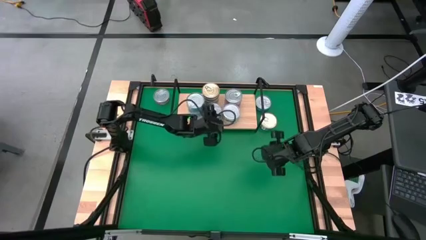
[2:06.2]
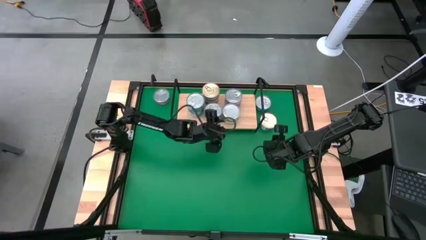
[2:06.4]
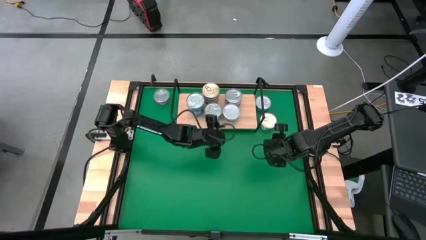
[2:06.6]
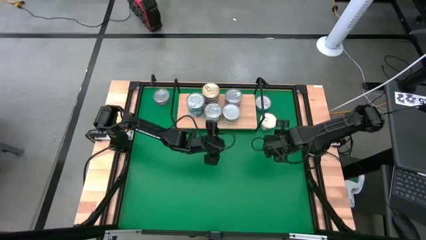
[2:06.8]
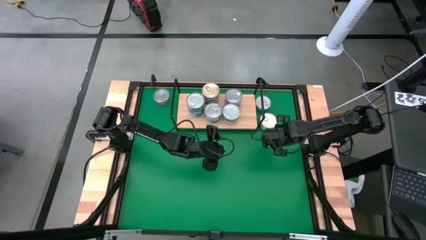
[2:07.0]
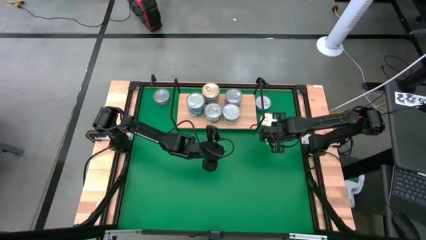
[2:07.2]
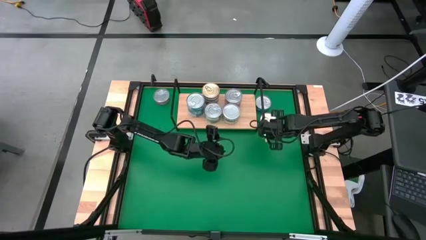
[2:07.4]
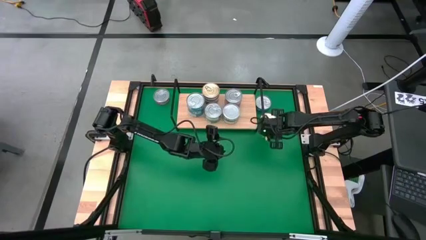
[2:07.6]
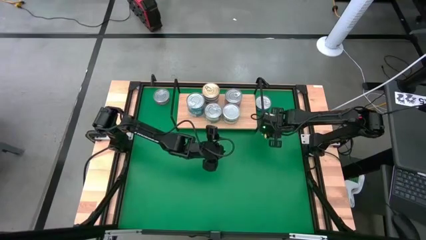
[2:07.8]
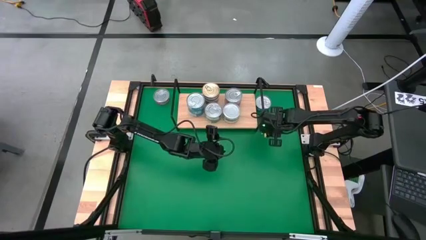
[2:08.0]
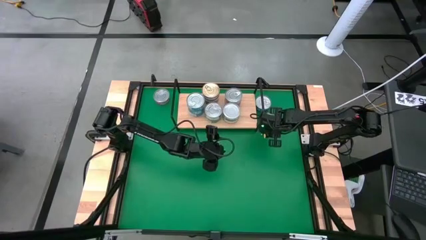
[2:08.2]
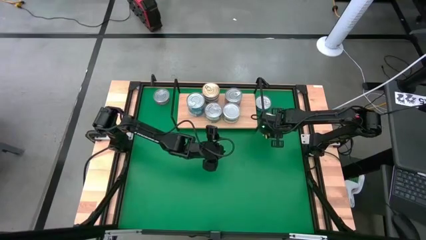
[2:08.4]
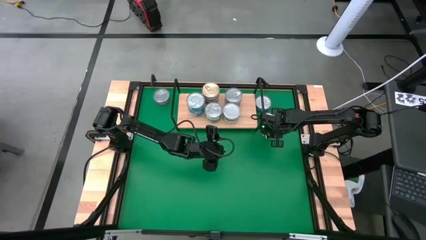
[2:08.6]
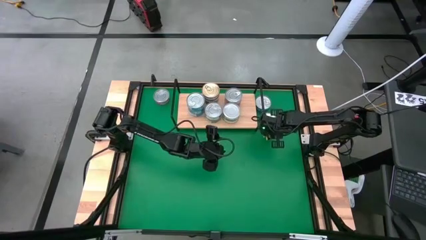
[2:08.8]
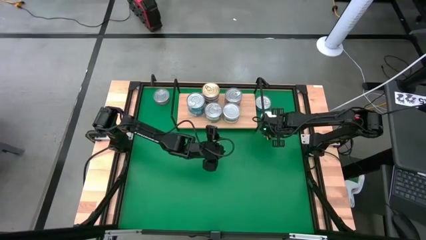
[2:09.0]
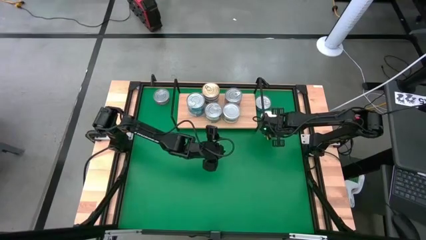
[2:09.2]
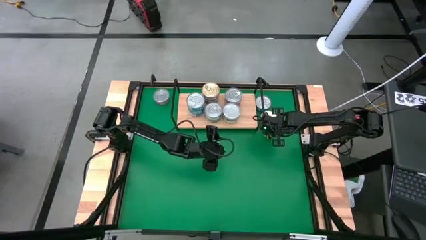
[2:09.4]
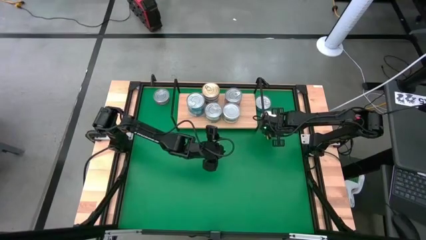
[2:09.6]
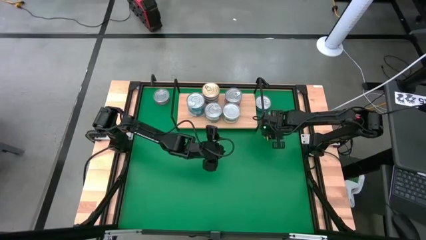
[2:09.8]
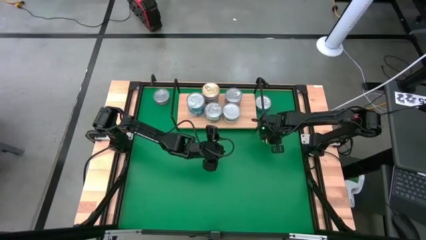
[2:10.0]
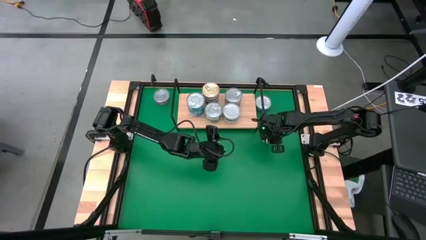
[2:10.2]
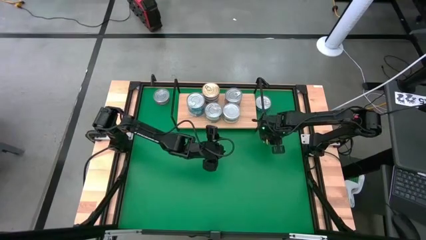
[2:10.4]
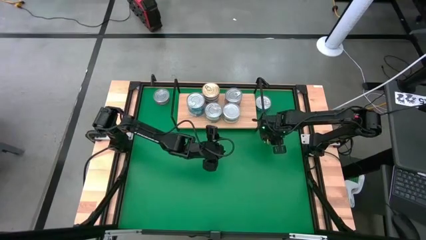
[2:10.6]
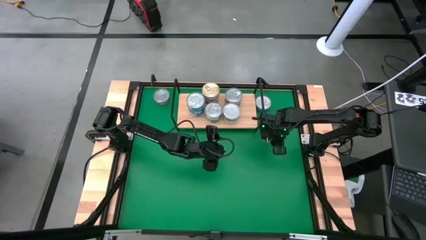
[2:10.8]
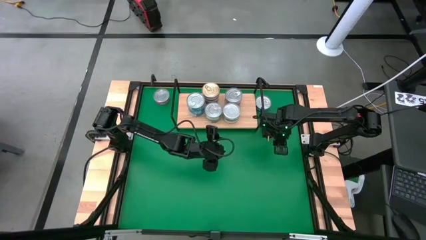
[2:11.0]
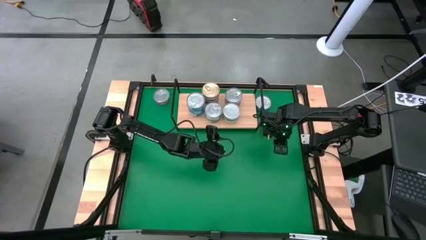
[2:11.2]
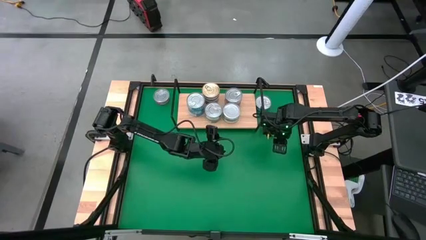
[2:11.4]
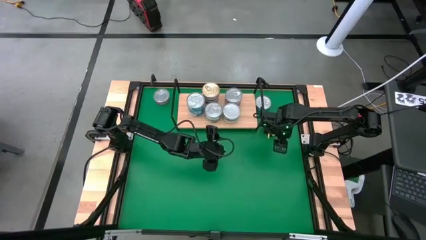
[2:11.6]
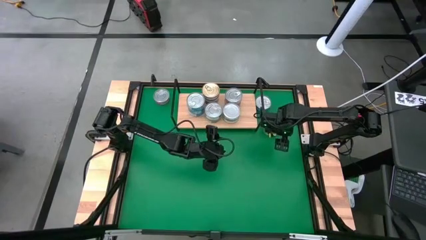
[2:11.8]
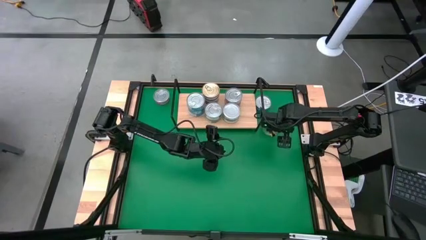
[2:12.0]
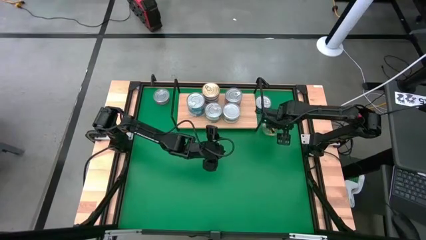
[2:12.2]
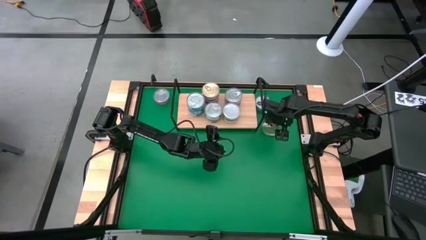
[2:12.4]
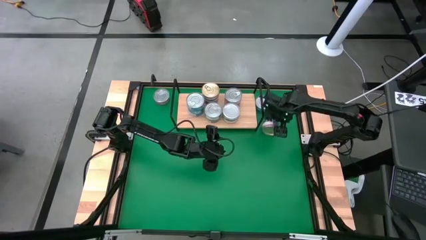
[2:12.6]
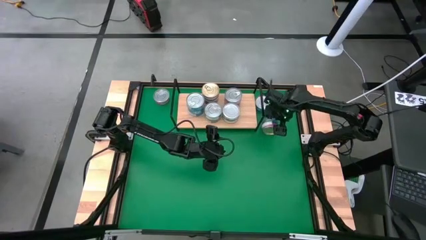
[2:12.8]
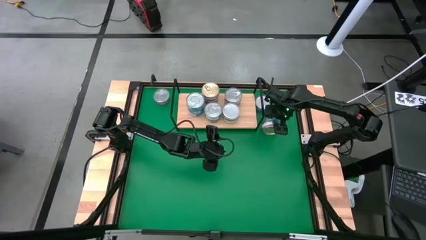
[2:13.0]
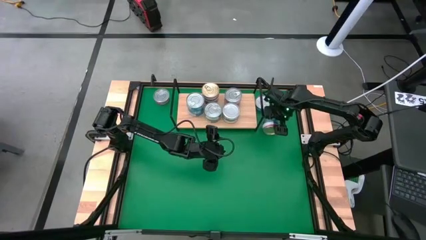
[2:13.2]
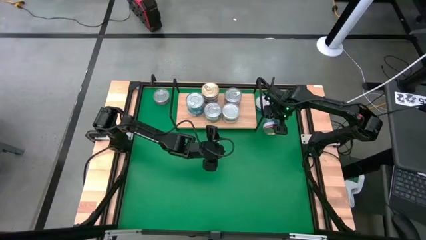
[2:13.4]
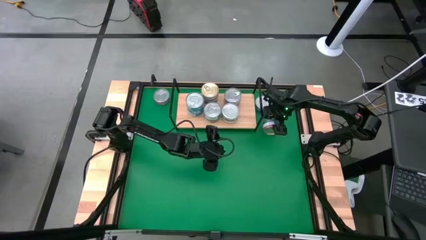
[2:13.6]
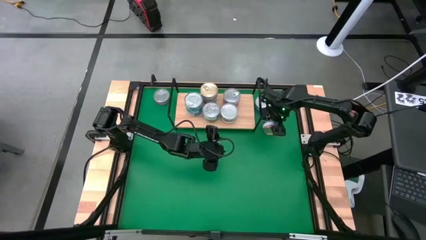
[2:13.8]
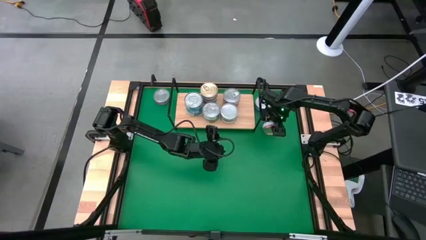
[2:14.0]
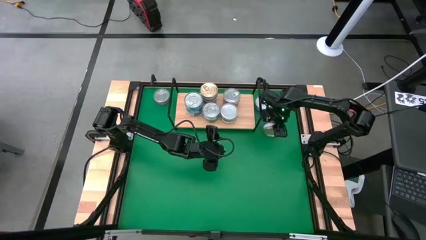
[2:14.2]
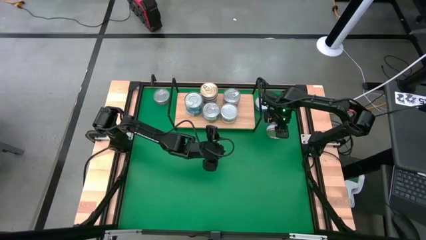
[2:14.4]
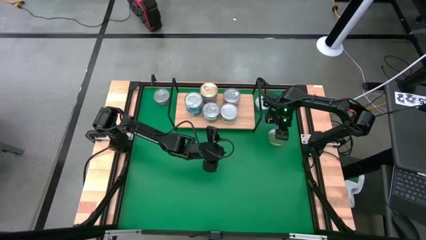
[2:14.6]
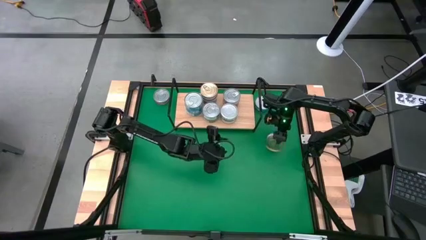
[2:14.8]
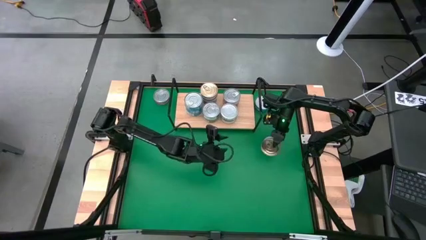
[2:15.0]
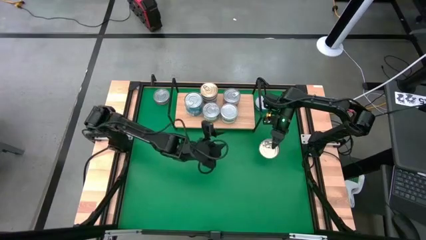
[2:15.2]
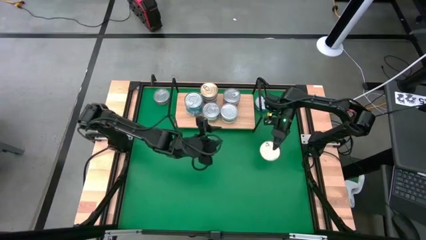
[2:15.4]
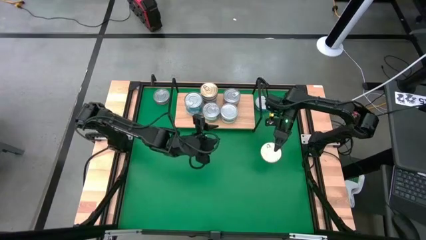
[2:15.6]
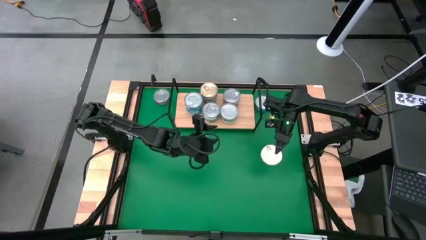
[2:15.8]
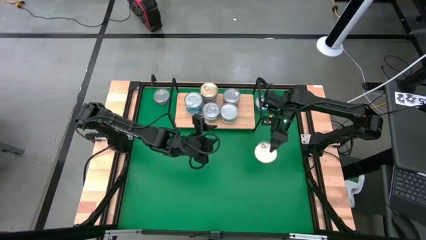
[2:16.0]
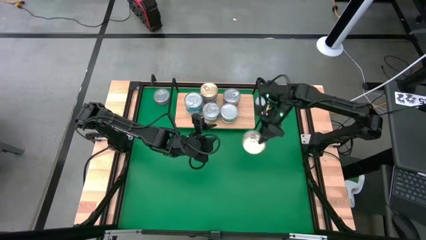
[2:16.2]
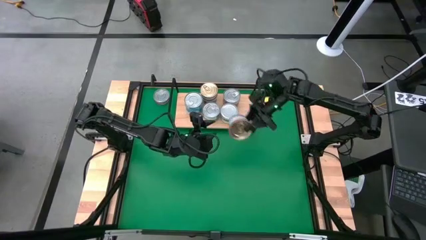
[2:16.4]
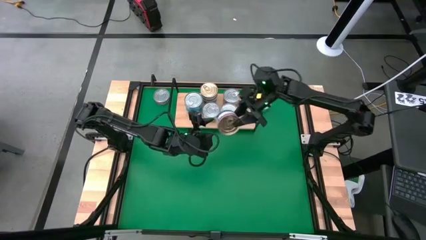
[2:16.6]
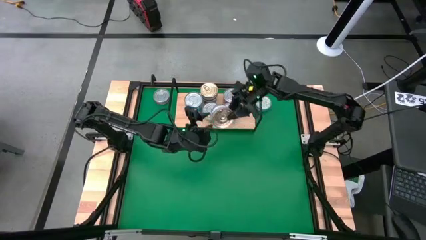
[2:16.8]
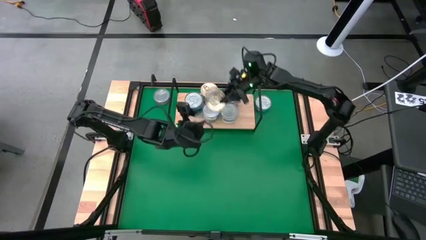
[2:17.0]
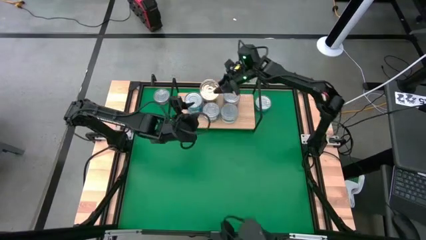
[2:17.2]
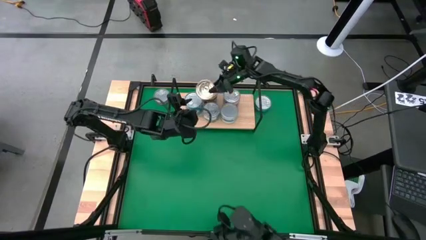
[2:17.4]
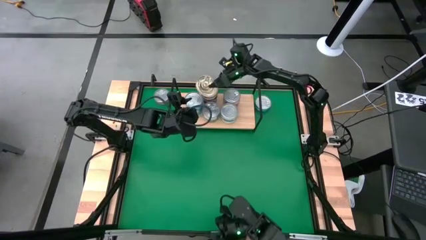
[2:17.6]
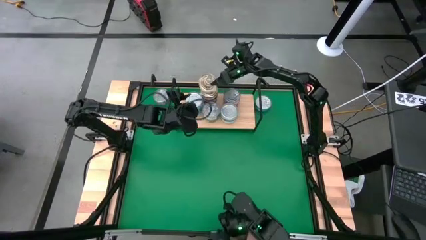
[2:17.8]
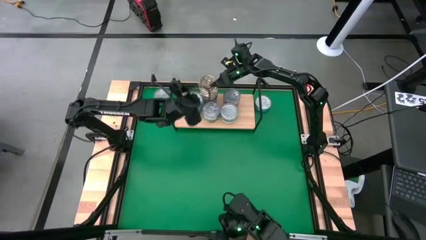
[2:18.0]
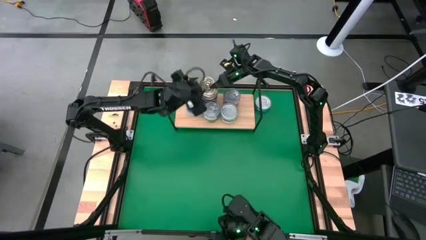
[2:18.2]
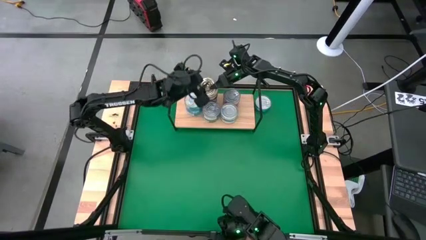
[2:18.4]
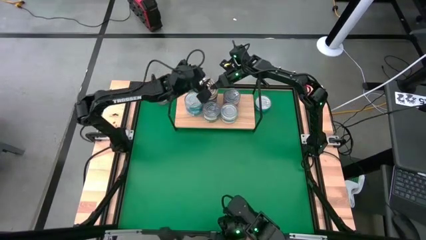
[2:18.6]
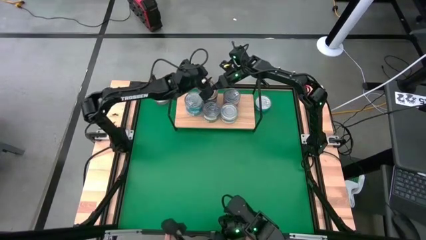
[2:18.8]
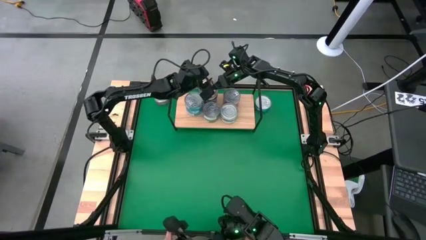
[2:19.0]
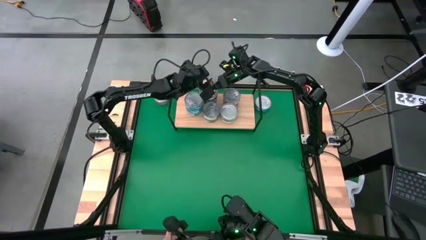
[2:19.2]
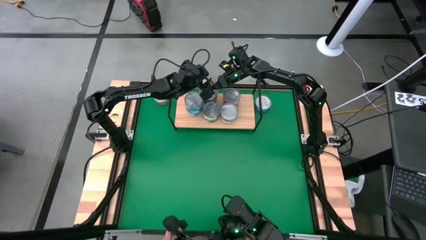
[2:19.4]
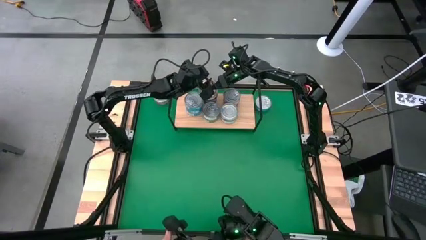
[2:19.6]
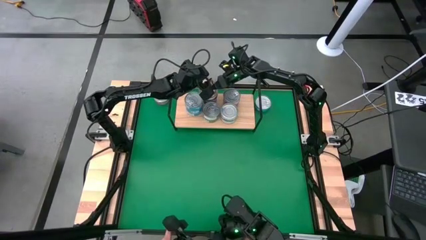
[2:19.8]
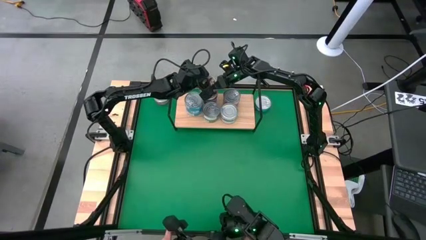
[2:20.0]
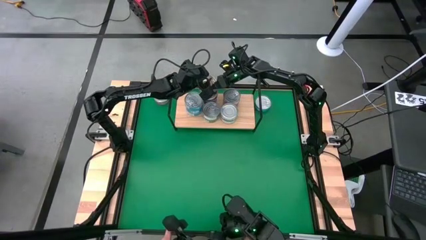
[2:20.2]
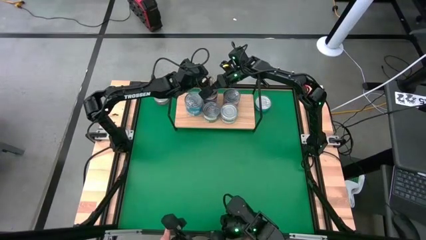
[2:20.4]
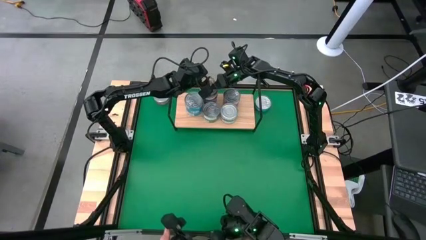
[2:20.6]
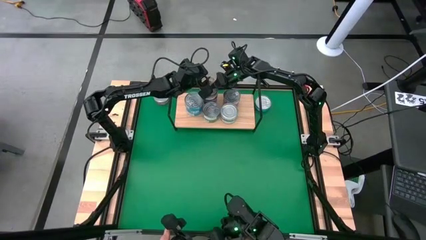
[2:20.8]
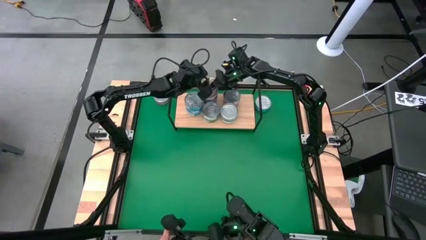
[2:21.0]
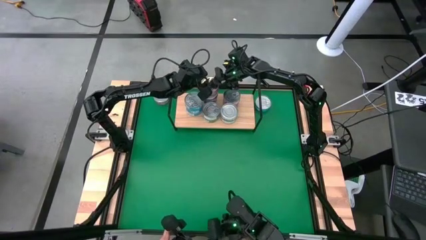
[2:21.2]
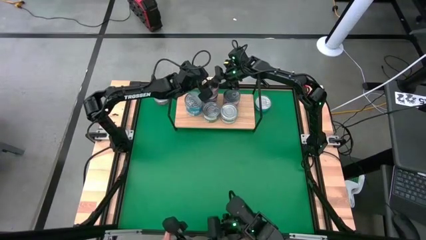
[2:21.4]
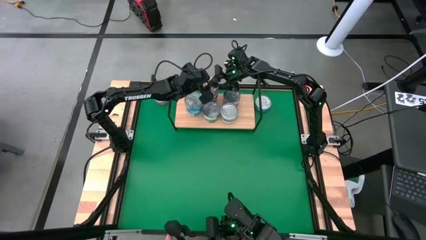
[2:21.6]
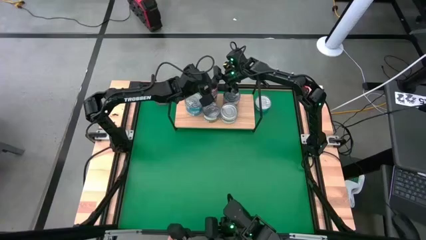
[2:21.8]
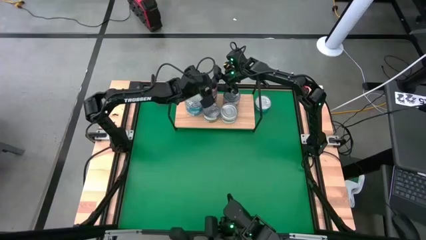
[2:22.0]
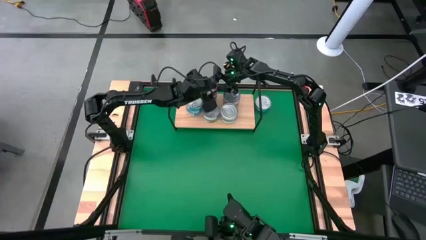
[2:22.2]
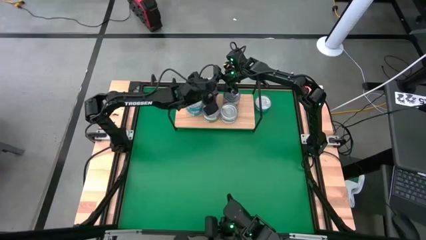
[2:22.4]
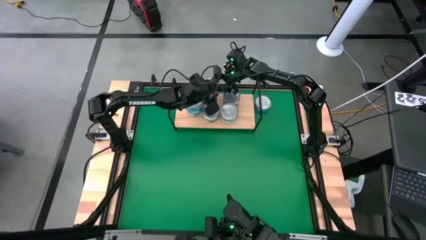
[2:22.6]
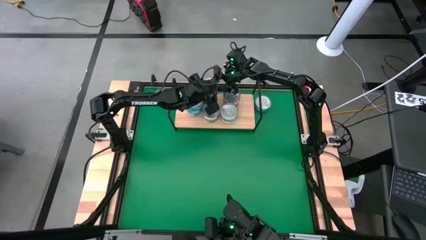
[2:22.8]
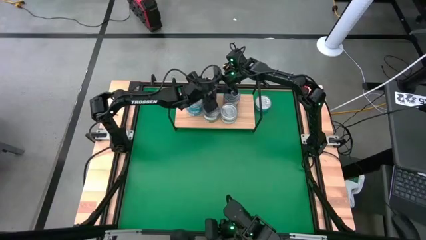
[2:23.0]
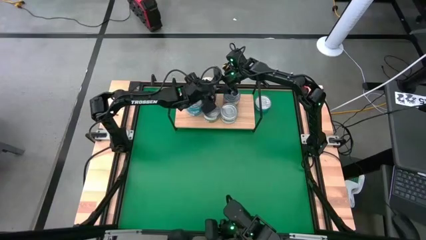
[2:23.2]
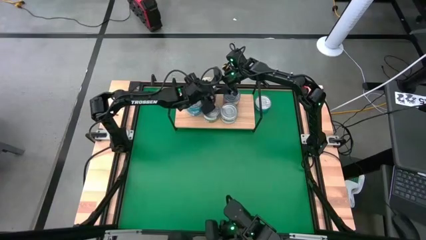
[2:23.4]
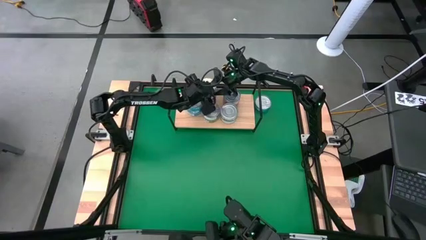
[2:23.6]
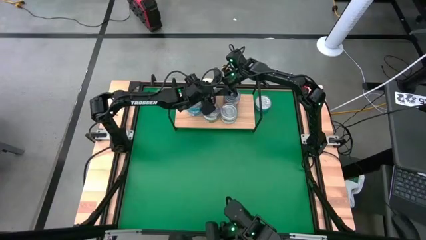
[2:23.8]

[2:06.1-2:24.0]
Task: Stack canned seafood by type on shelf
Stack the blue pink tuna can on top of the blue pink tuna can on the shelf
